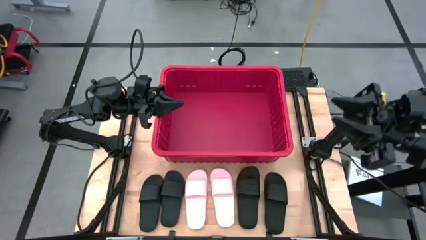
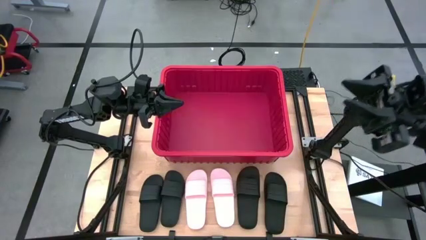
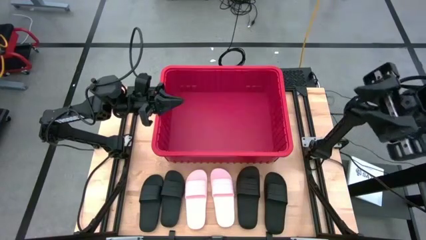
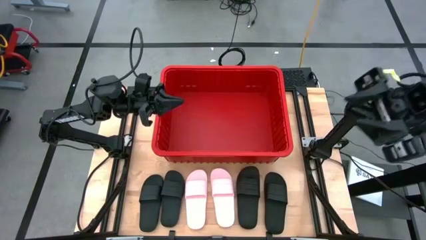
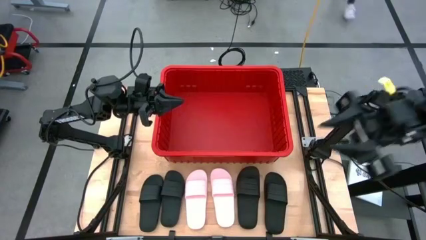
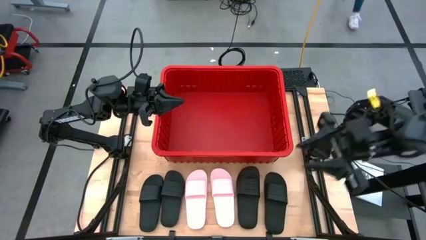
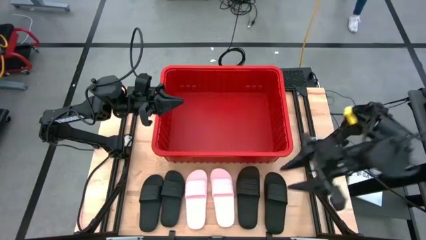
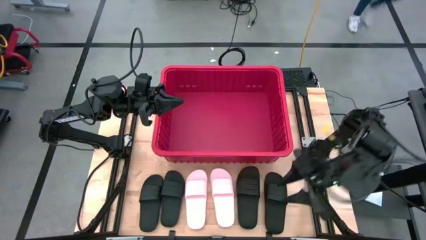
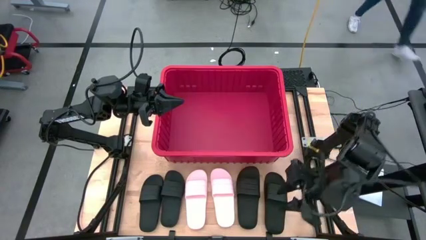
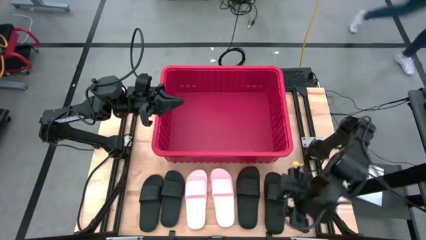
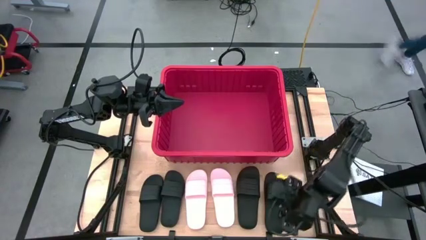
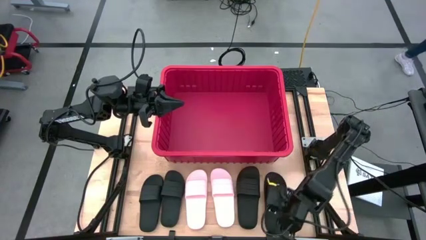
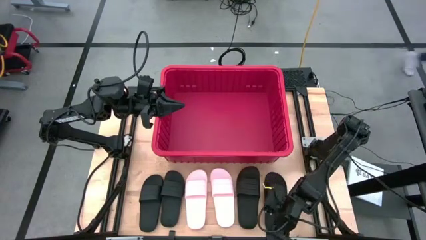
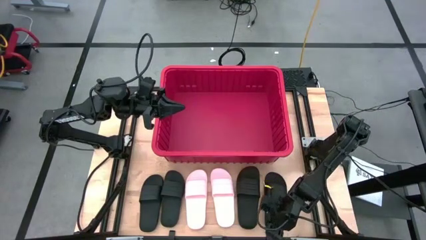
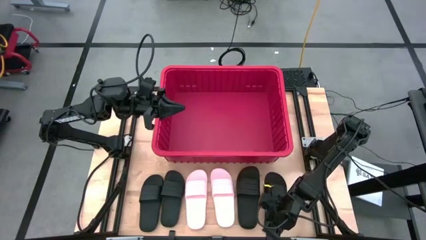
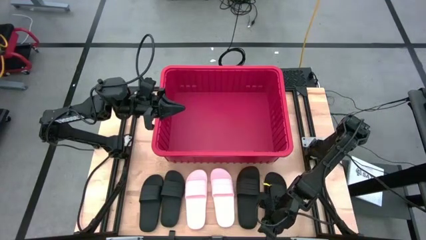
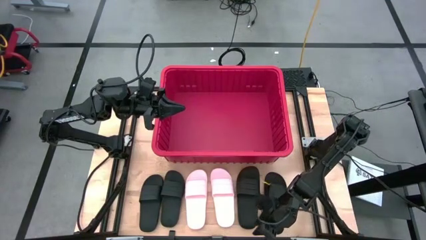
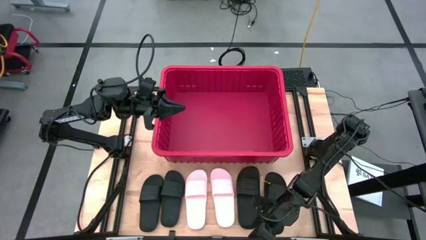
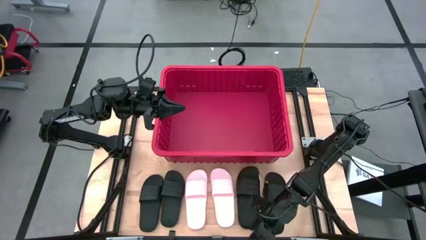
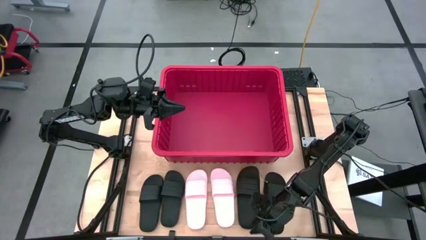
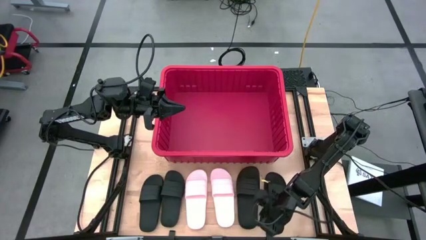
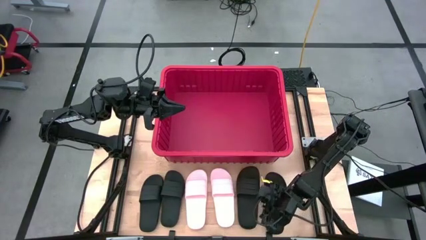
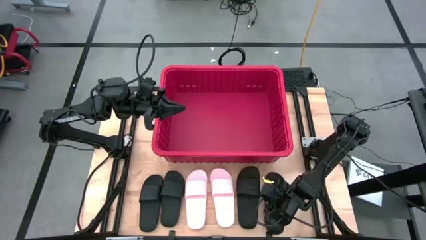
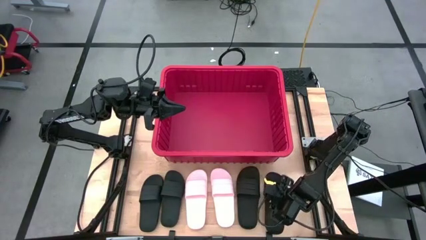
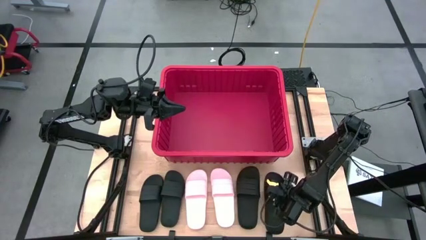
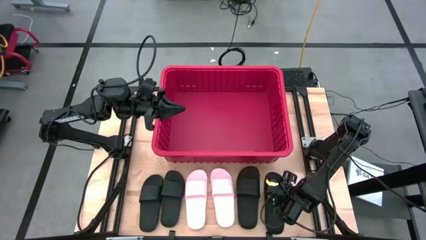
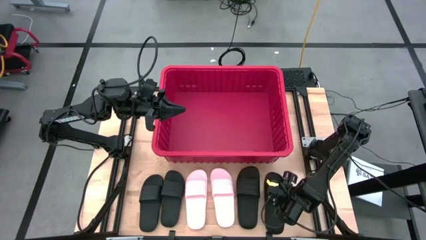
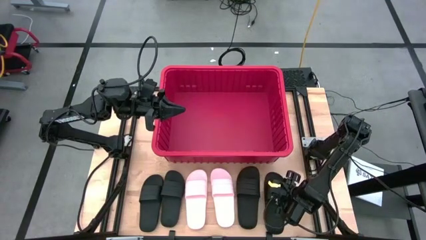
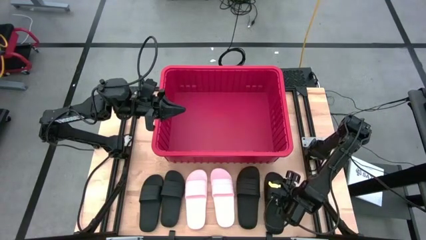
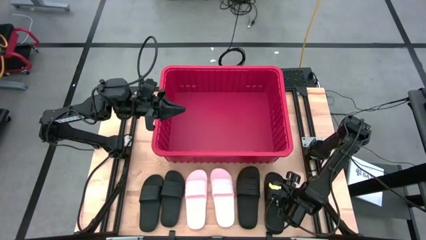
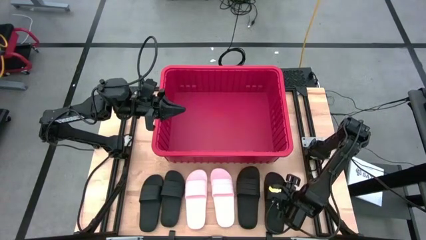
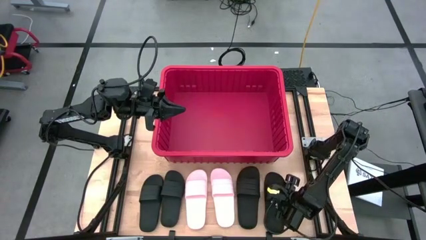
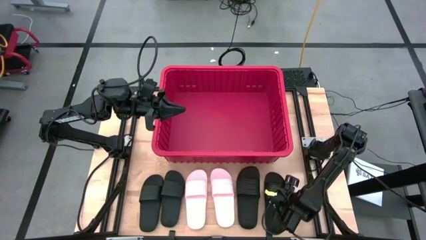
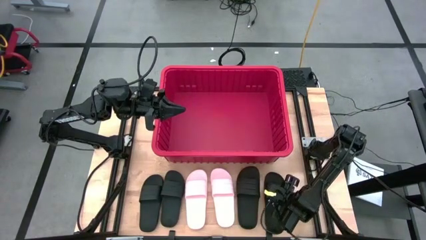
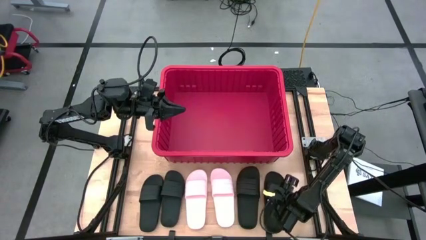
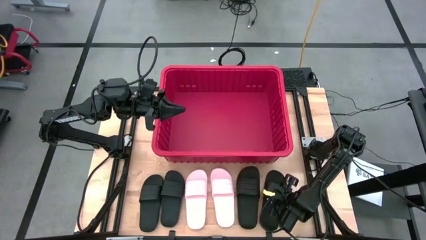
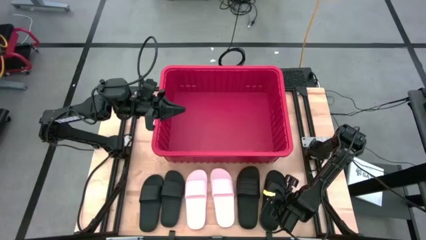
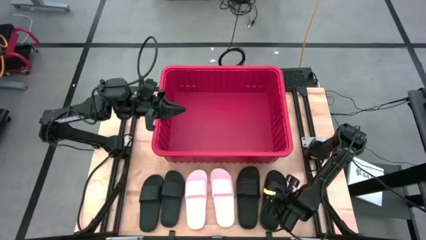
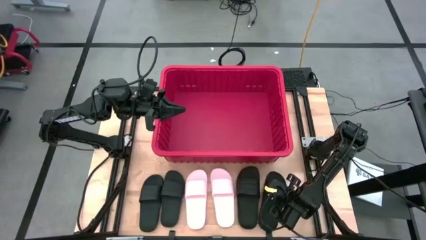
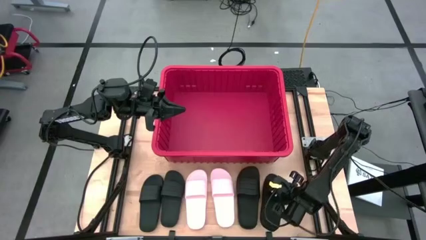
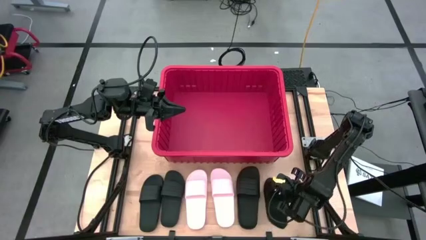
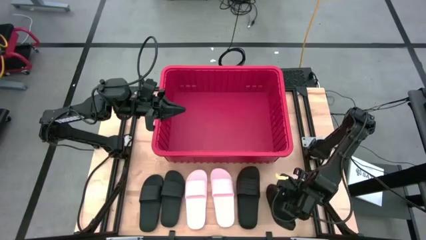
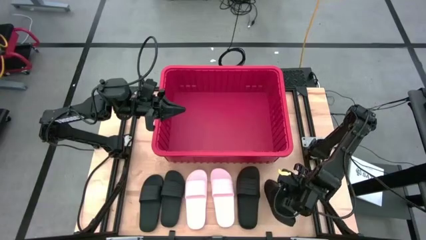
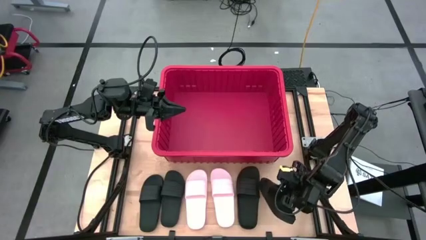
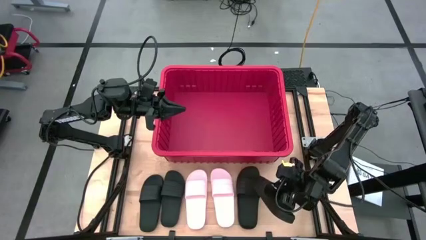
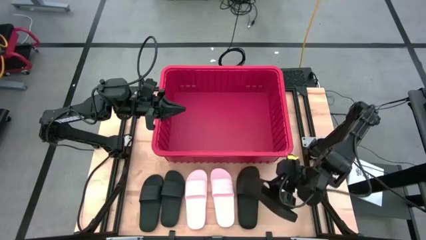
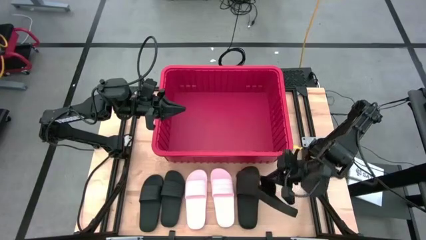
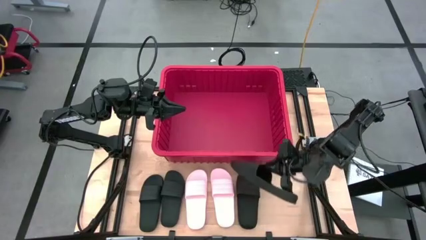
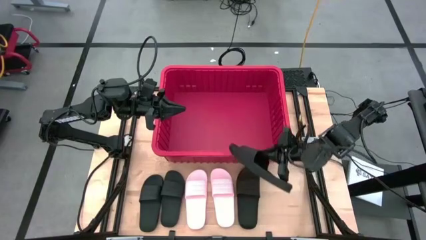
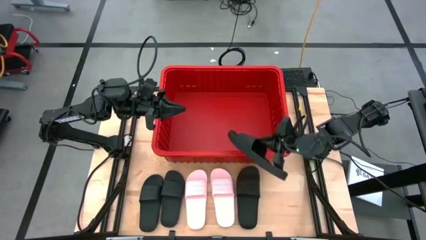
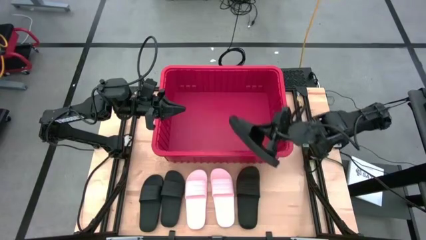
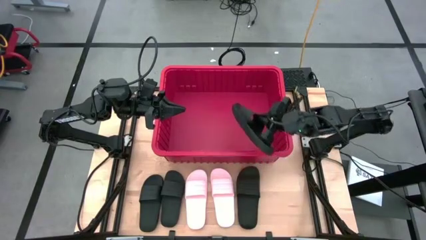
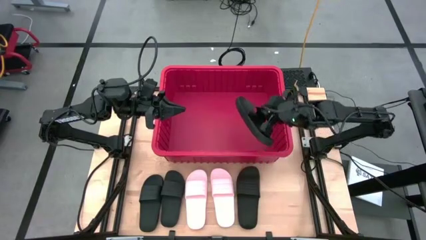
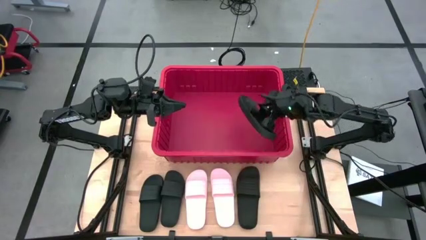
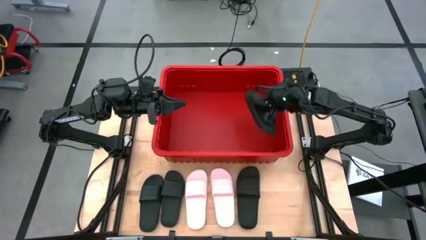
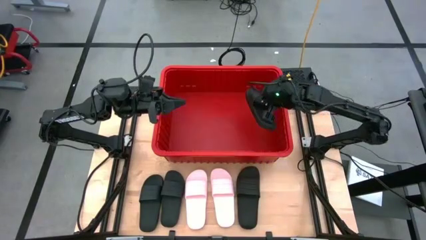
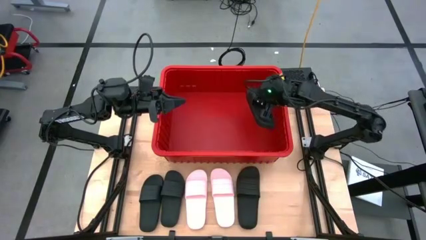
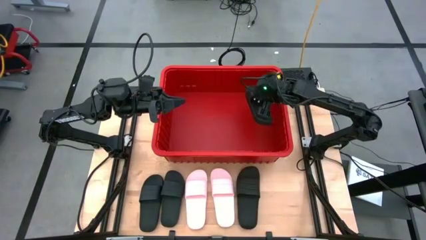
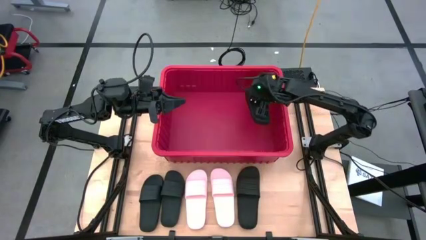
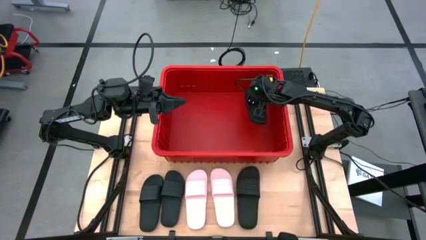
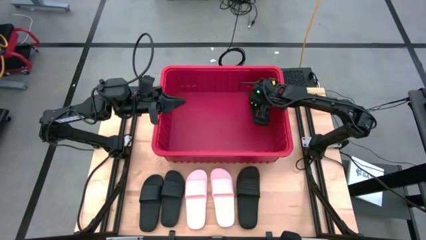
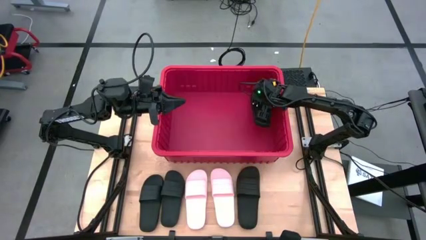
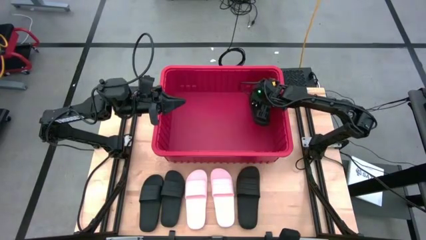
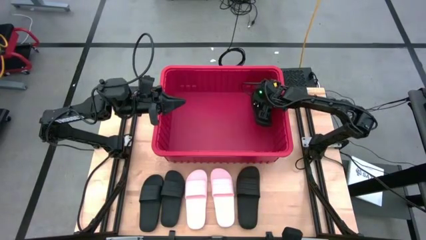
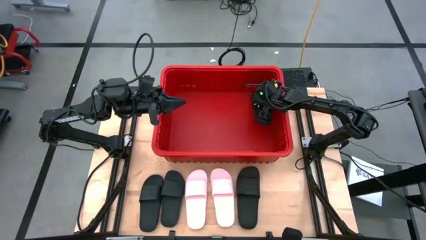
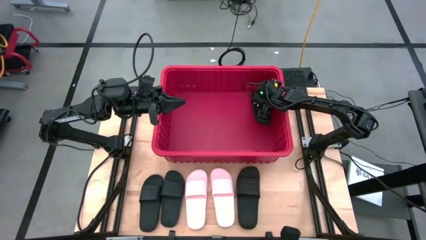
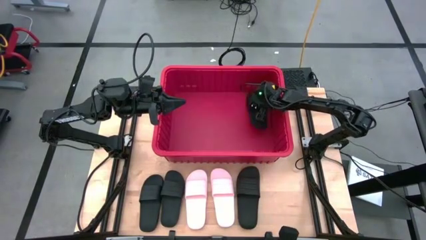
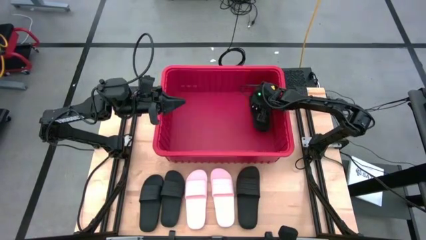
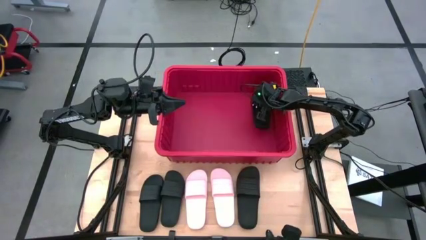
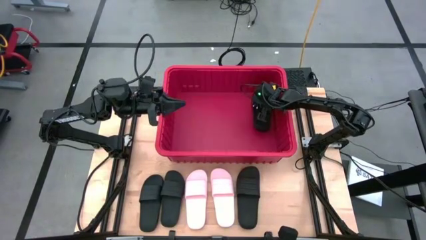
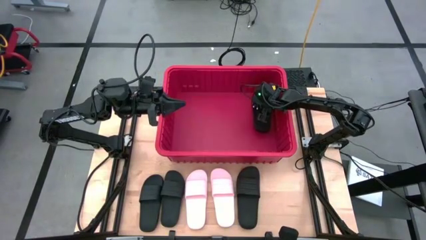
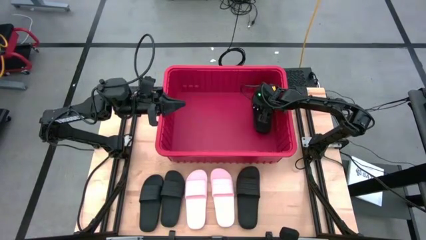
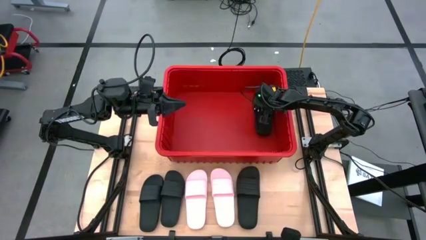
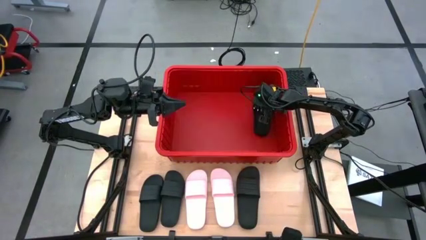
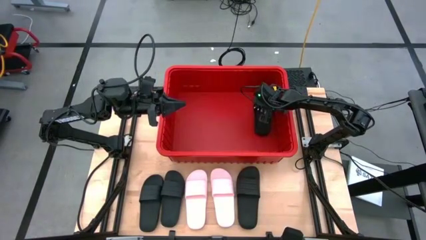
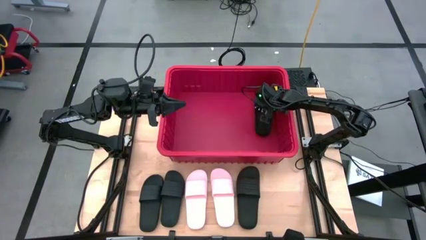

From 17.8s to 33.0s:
Task: Pick and place slides into bin
Put the black slide into the red organizer bin
